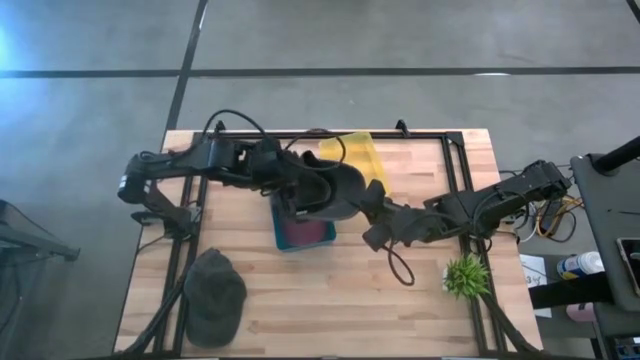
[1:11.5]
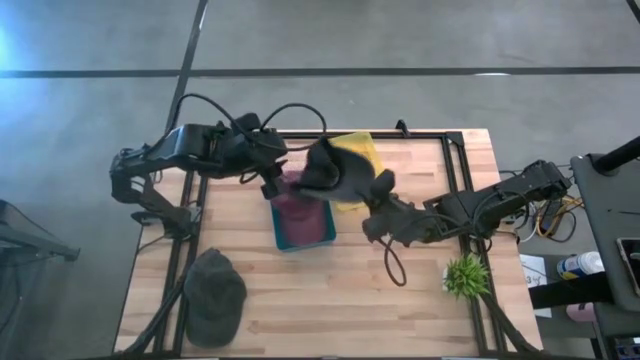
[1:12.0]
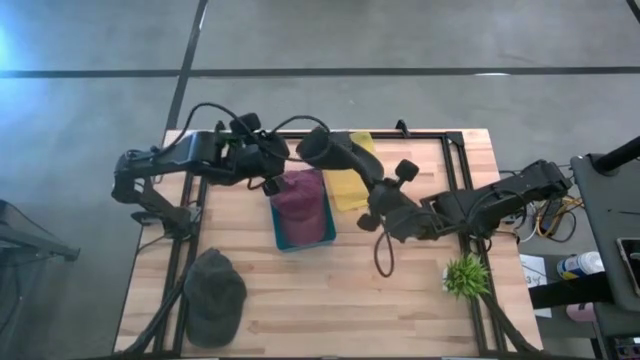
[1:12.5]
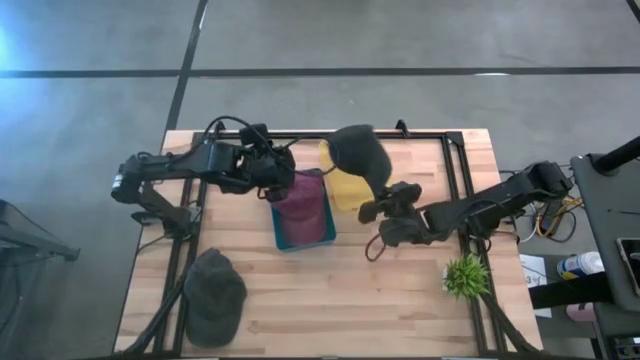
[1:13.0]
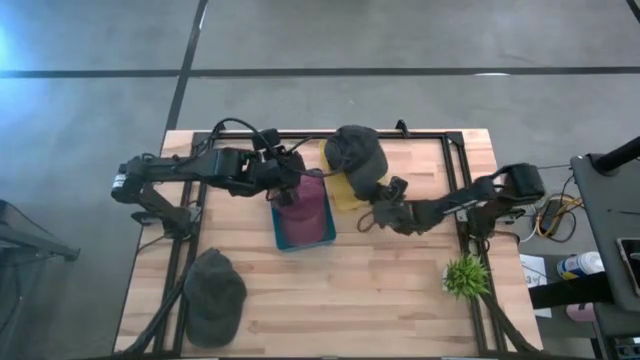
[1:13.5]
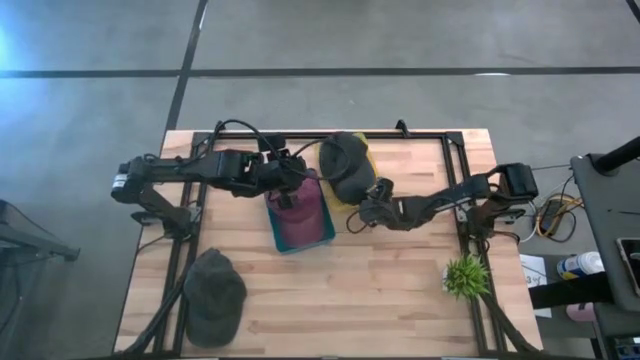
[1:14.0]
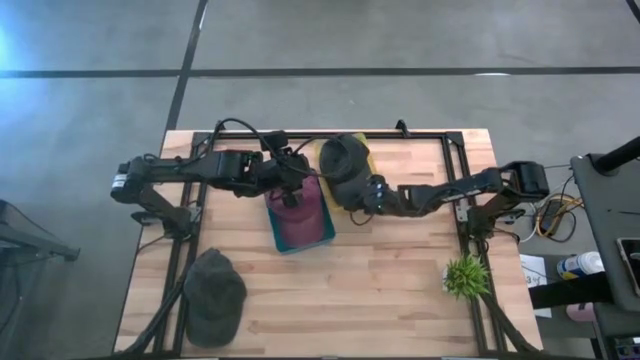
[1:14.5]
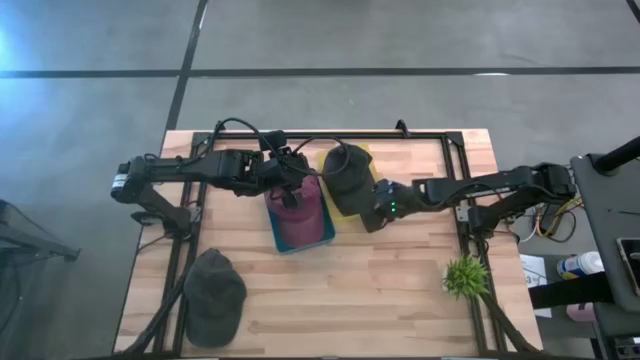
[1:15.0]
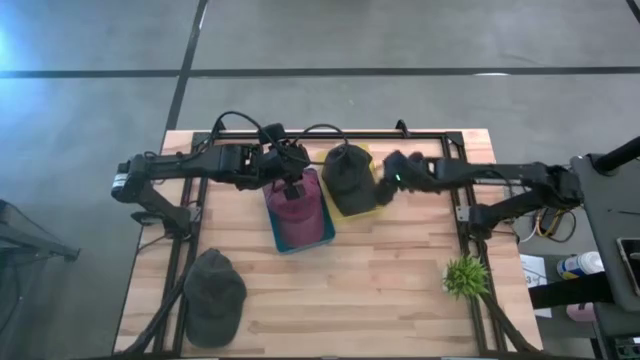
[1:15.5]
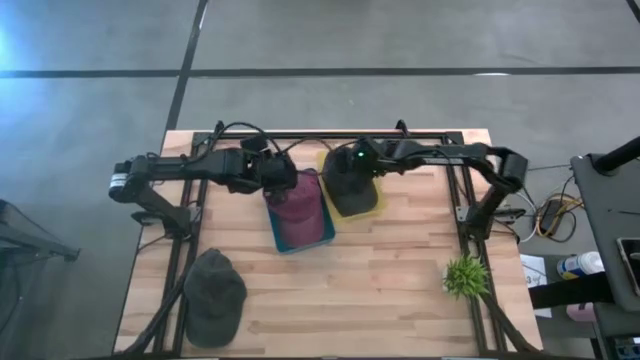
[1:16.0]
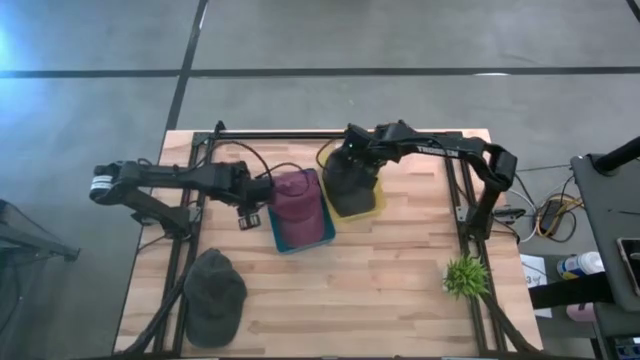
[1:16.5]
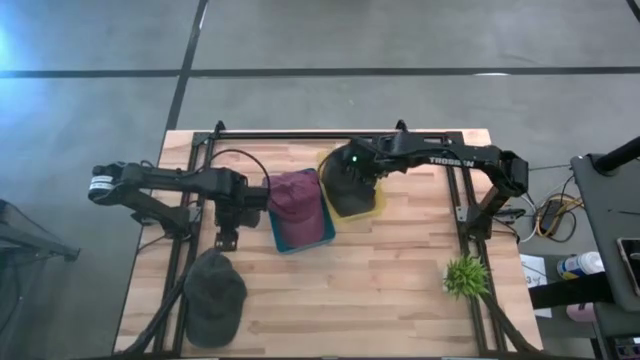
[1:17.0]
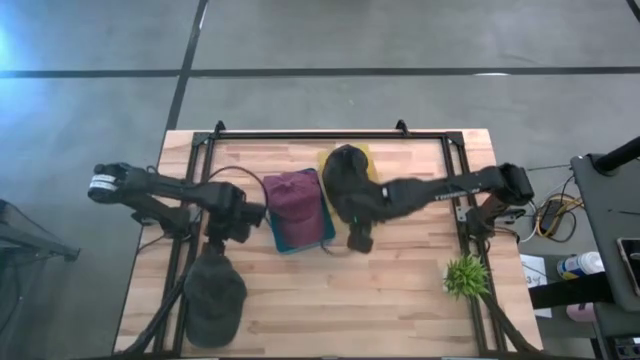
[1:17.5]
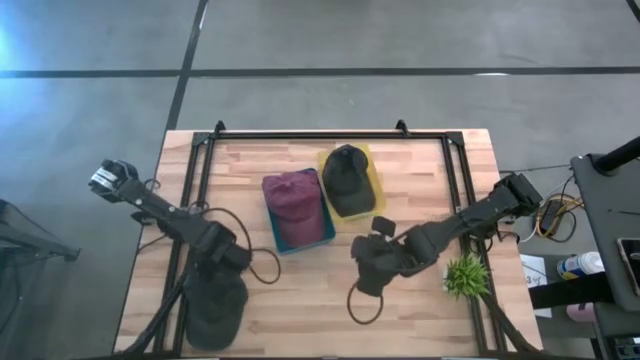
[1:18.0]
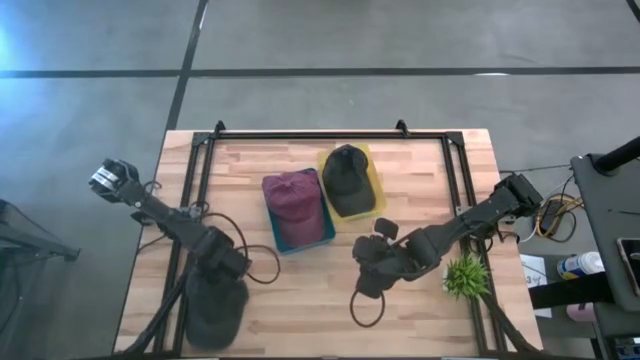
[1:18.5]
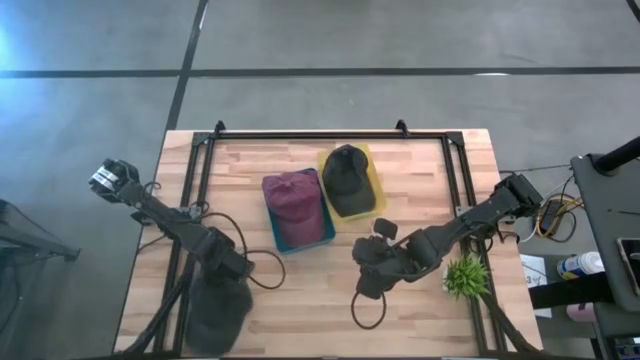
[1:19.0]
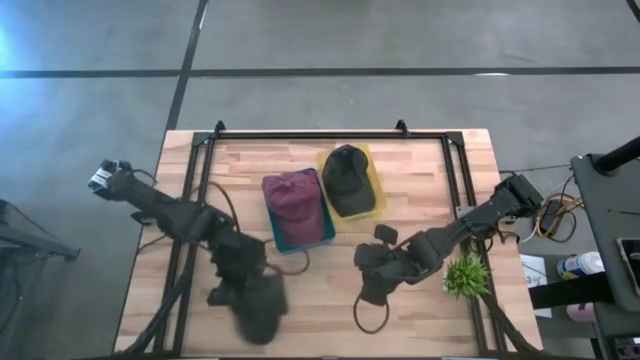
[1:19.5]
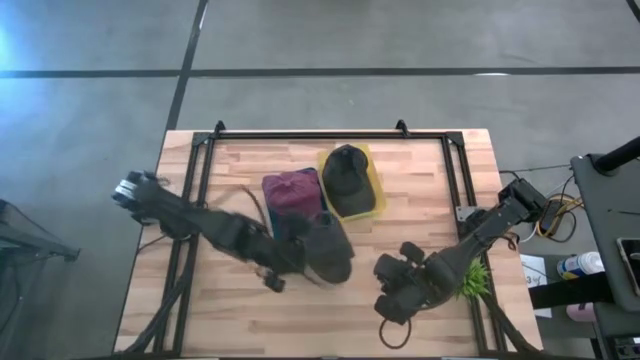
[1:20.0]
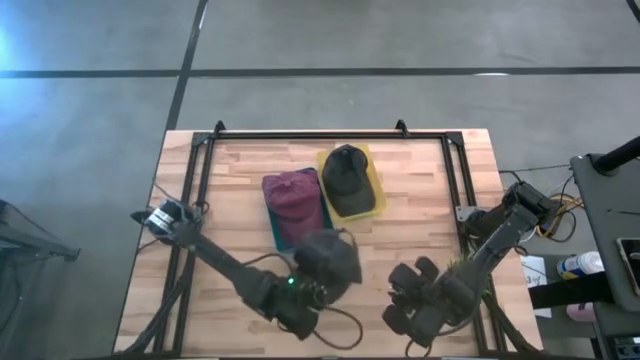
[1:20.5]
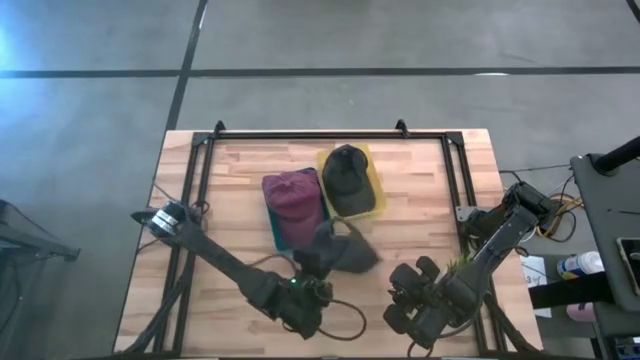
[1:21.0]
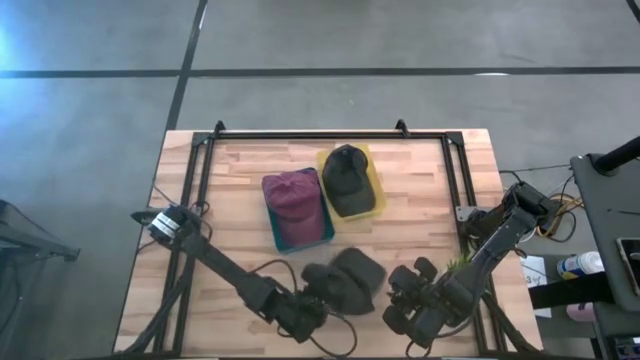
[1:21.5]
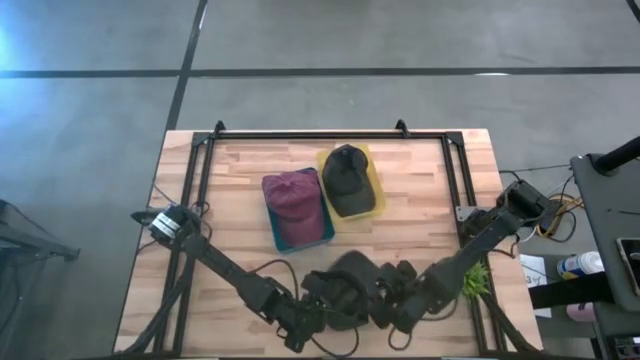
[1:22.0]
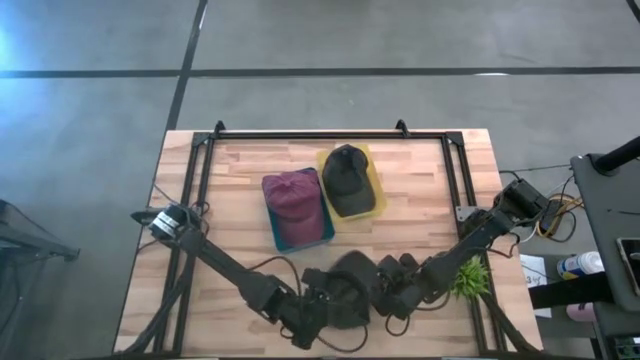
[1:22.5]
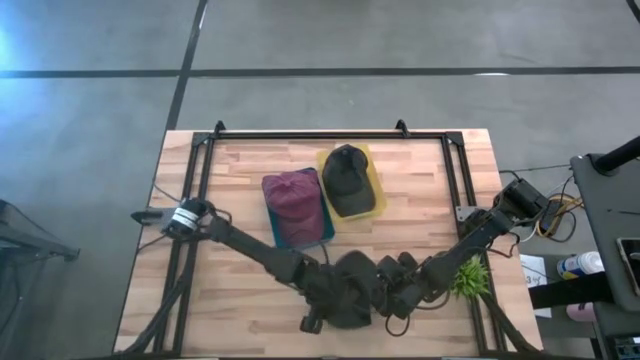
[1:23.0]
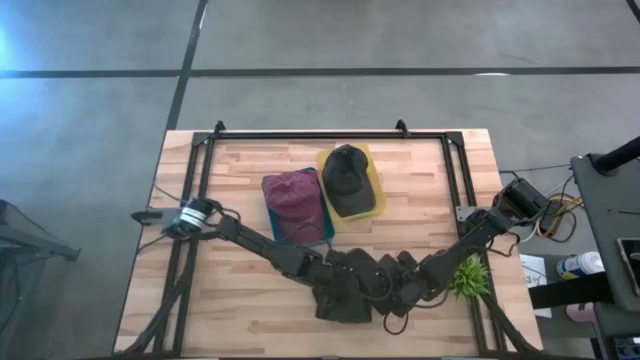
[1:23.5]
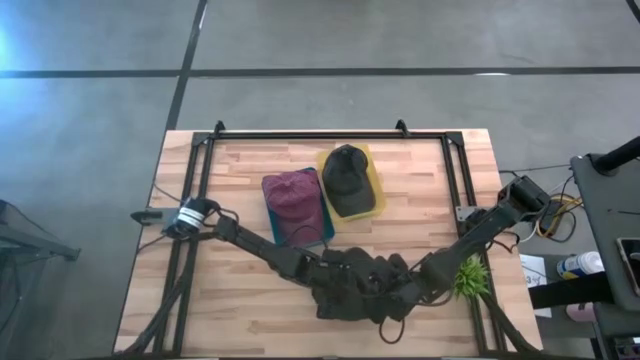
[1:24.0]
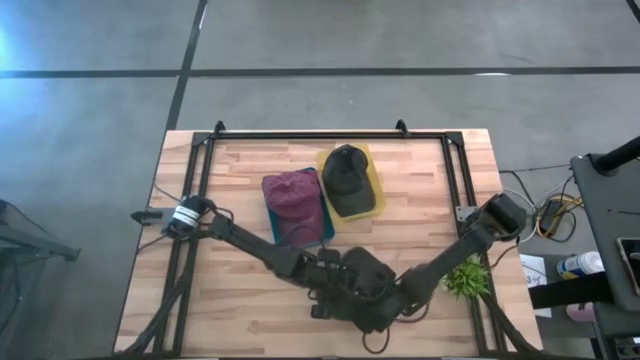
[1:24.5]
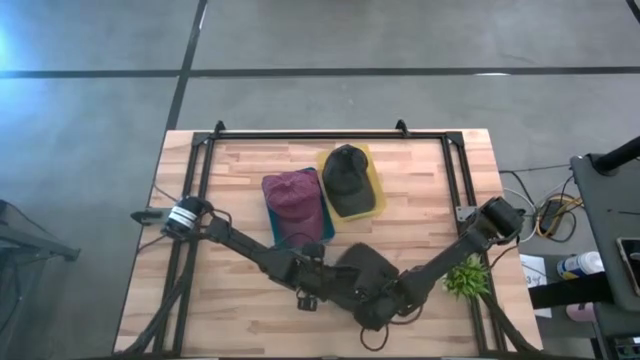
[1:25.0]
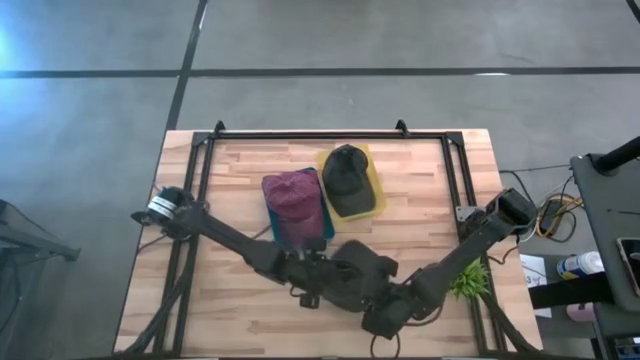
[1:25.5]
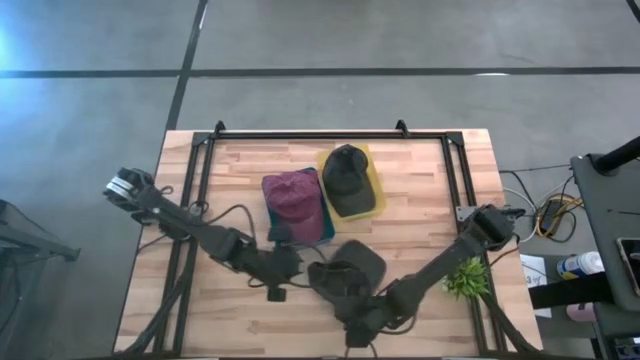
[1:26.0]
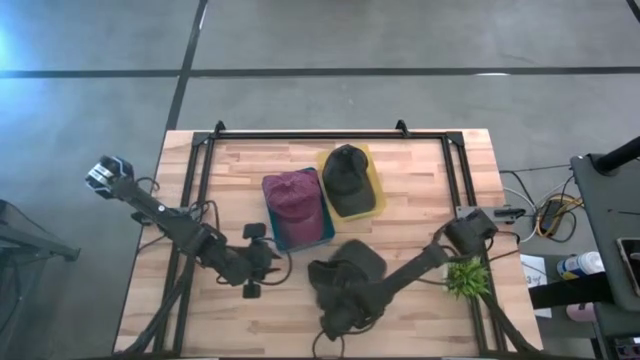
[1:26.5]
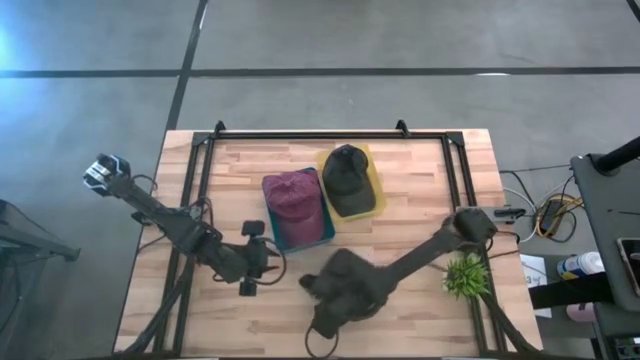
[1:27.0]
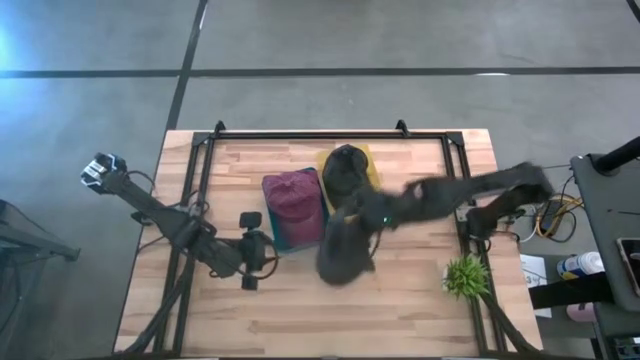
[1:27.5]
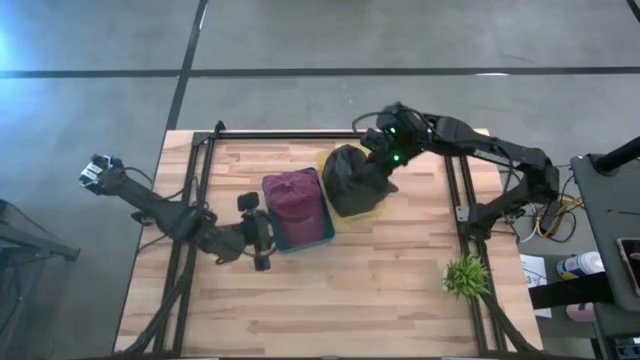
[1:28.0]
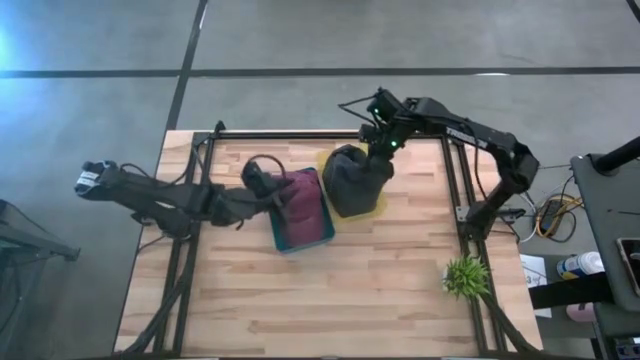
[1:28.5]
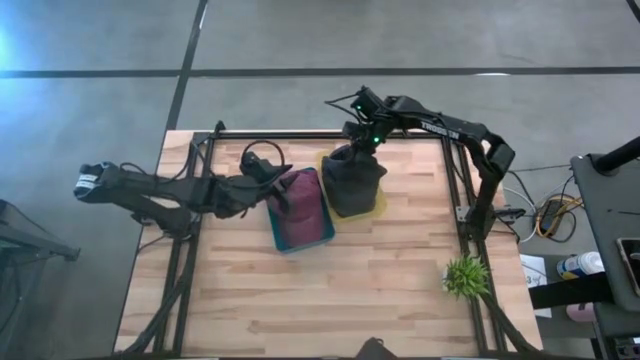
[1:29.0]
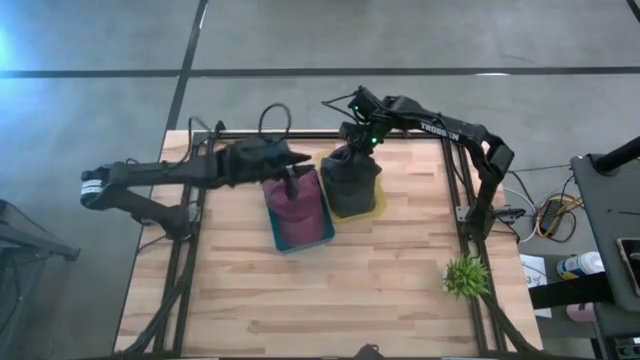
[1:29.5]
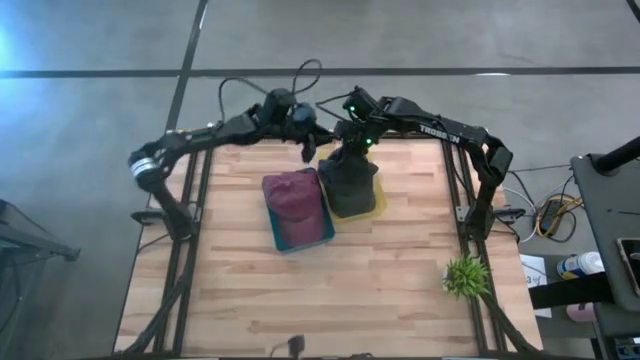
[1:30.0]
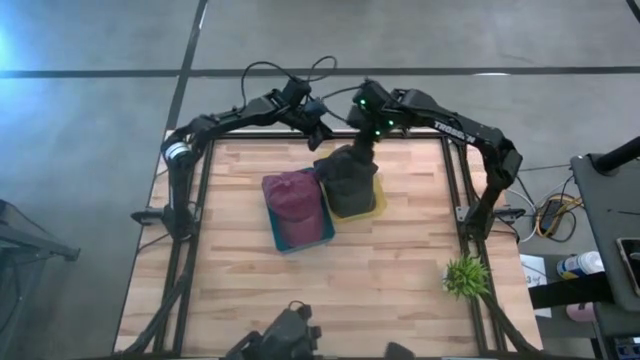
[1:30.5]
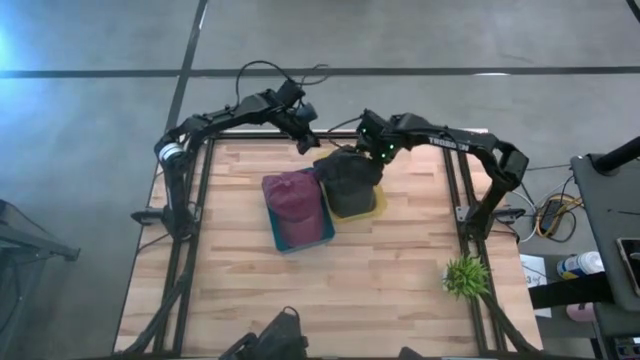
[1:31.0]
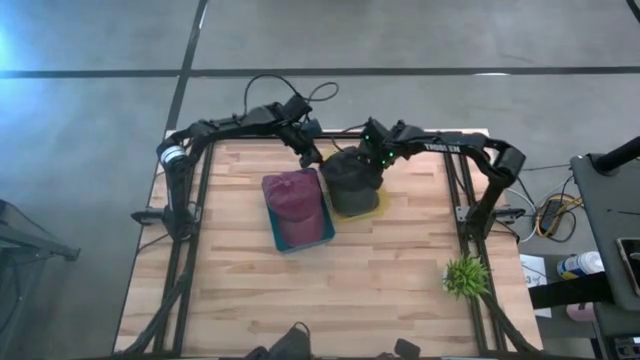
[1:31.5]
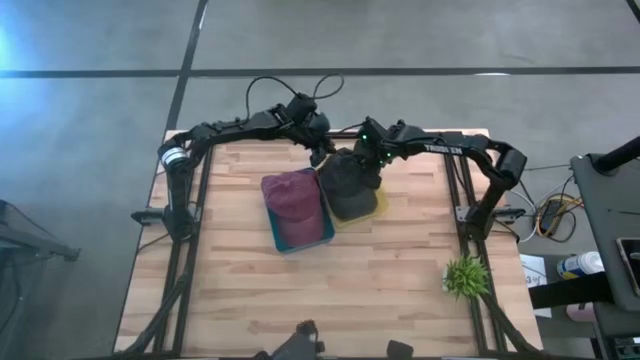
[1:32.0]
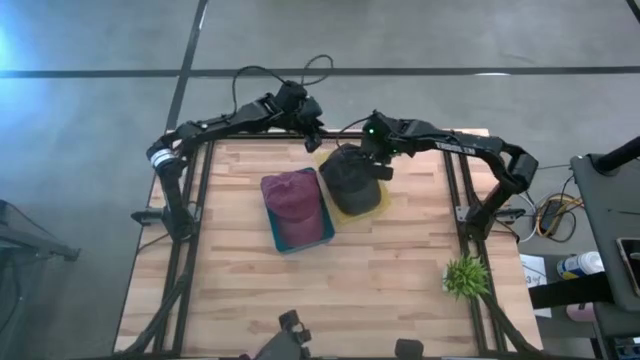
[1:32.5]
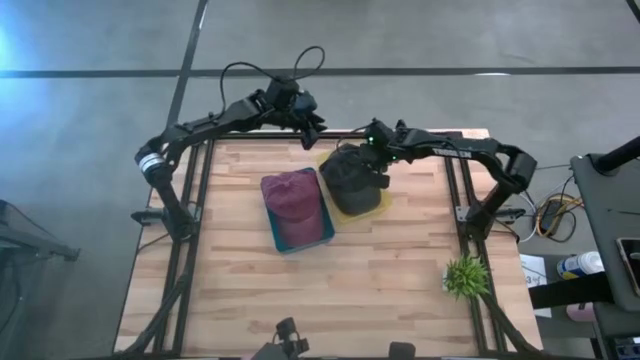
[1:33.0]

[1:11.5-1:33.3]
Task: Pick & Place hat
Put the black cap into the yellow bin
